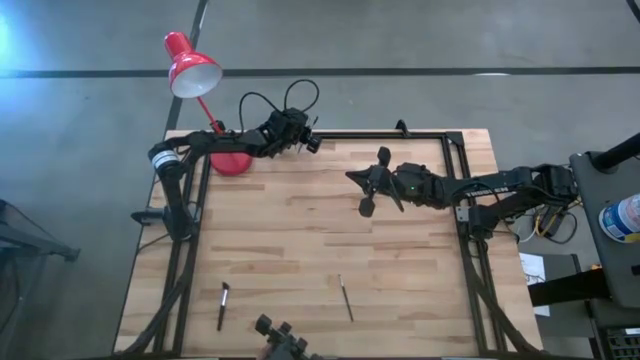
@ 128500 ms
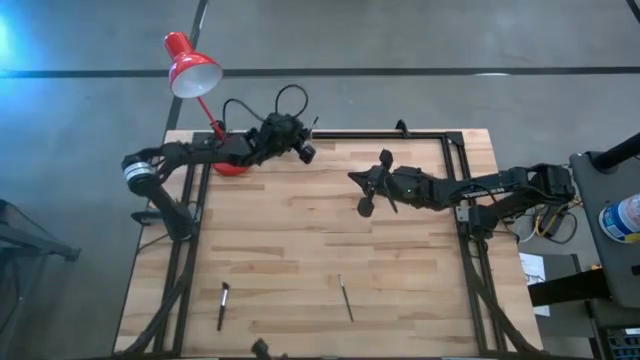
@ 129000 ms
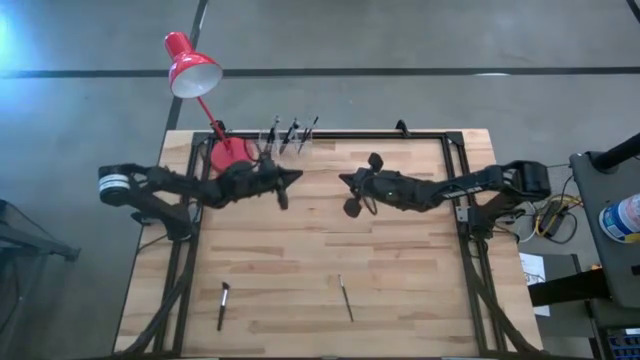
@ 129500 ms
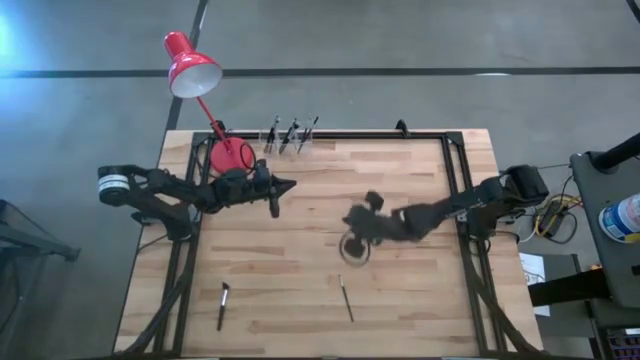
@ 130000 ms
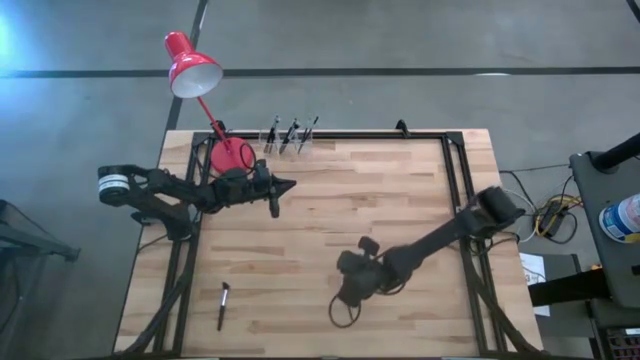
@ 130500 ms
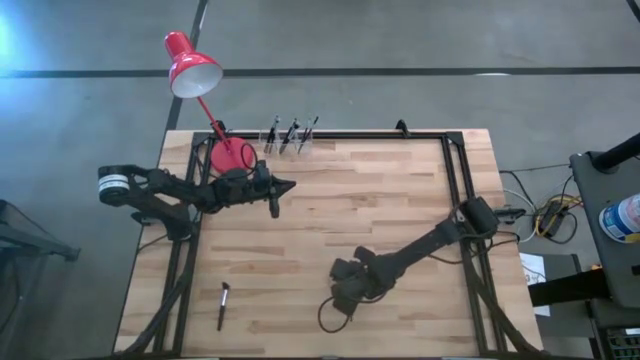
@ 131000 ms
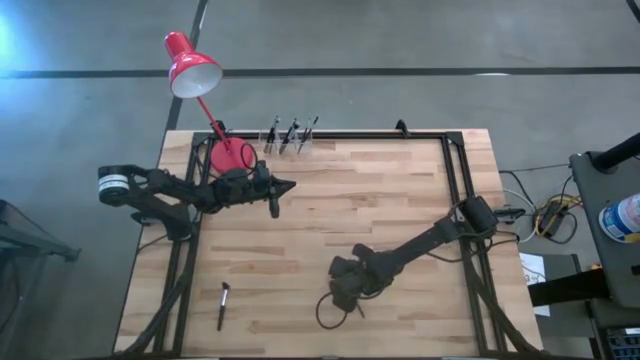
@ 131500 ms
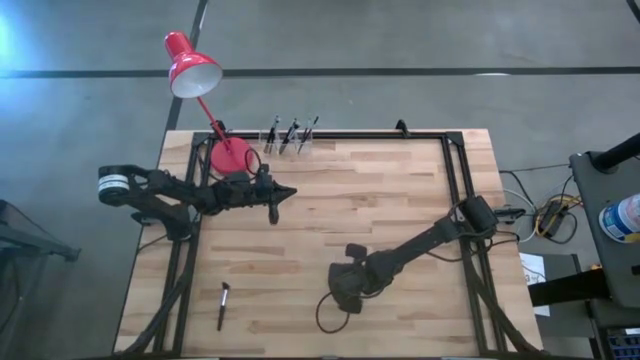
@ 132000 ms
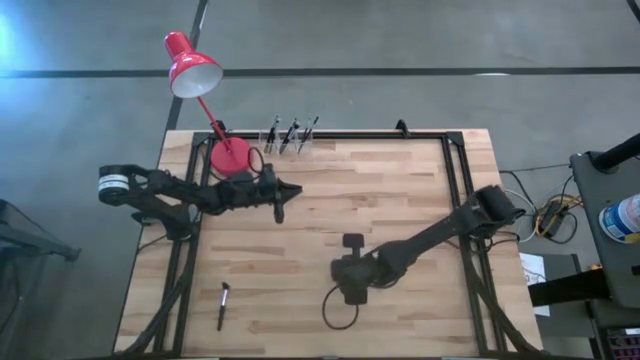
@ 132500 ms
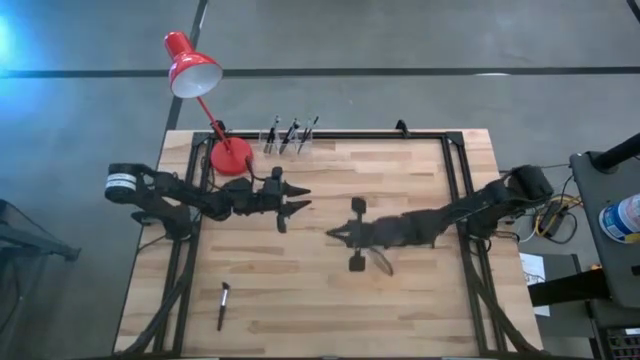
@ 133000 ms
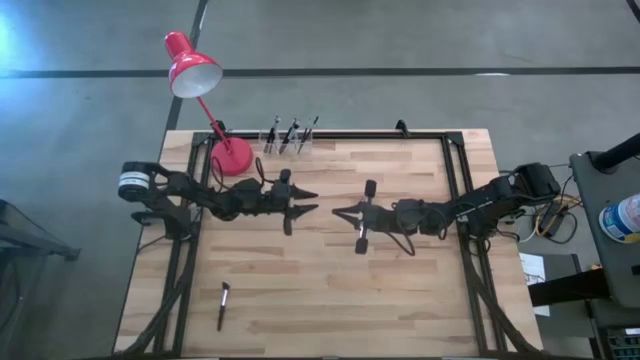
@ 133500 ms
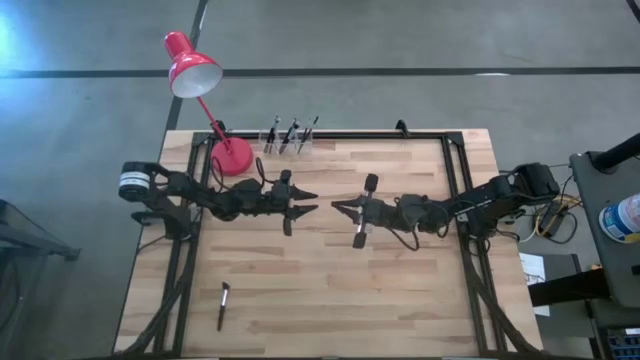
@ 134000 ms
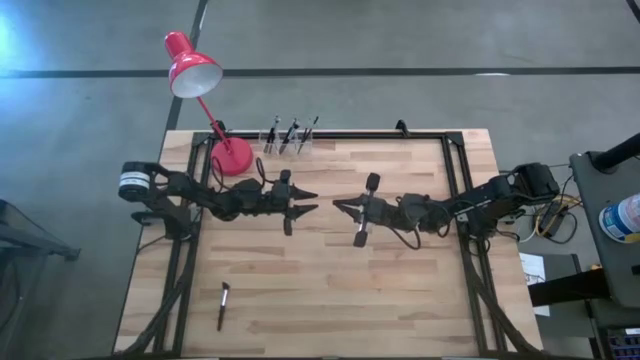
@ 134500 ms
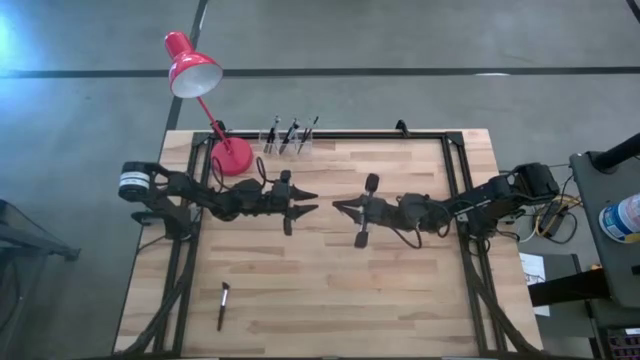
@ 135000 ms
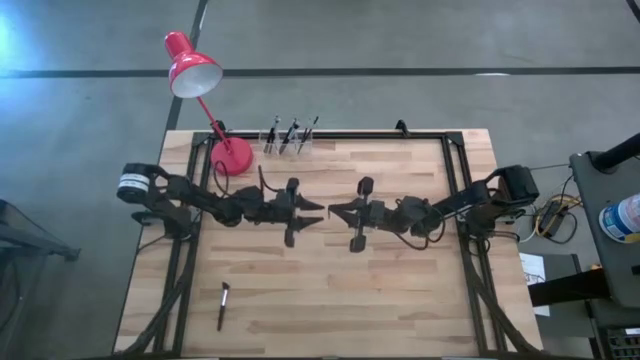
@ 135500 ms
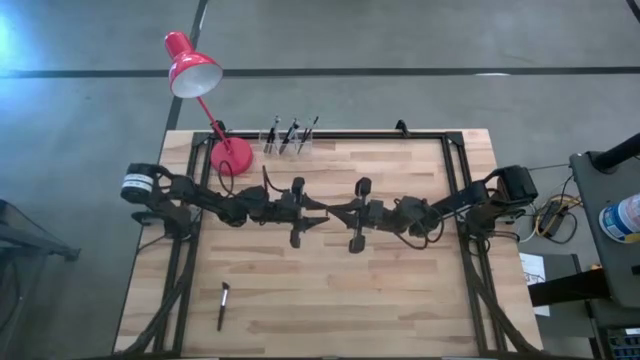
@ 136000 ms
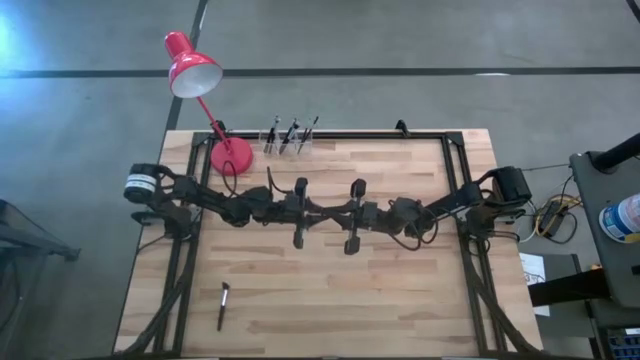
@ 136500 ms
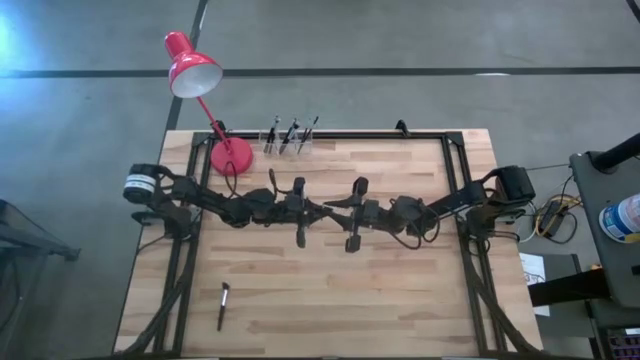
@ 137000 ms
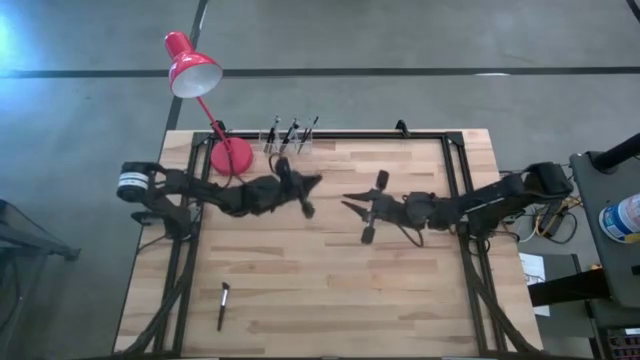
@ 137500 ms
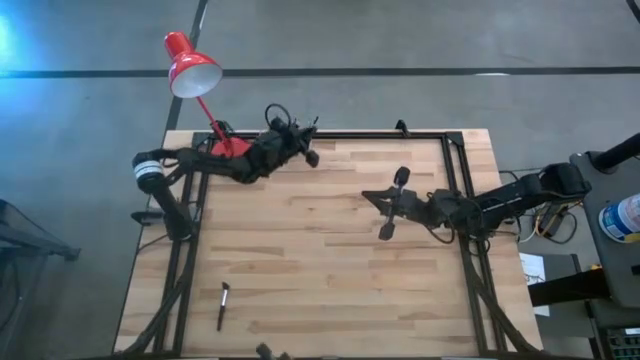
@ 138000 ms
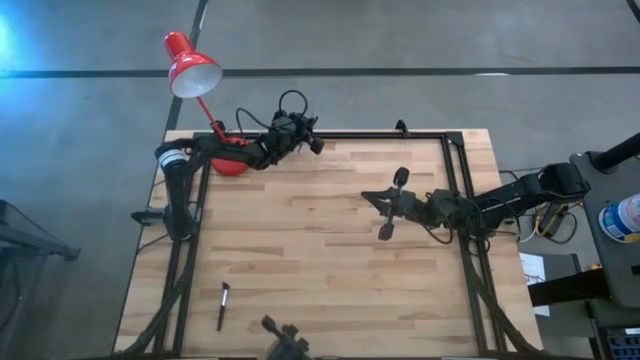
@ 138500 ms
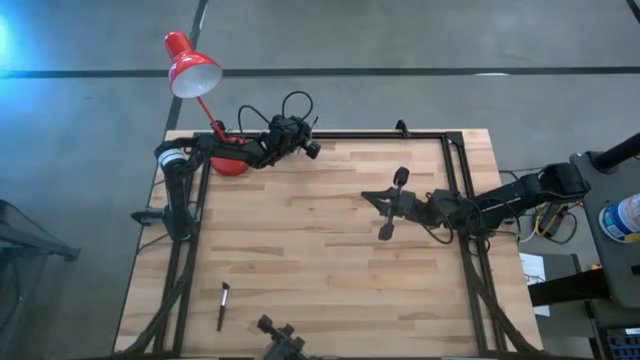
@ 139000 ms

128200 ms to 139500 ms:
Task: Pick & Place Makeup Supplies
Put the makeup brush into the transparent organizer

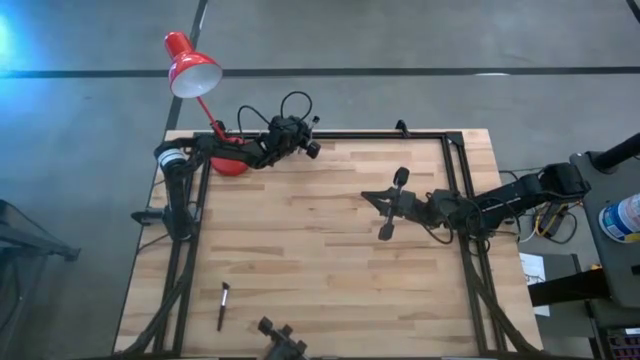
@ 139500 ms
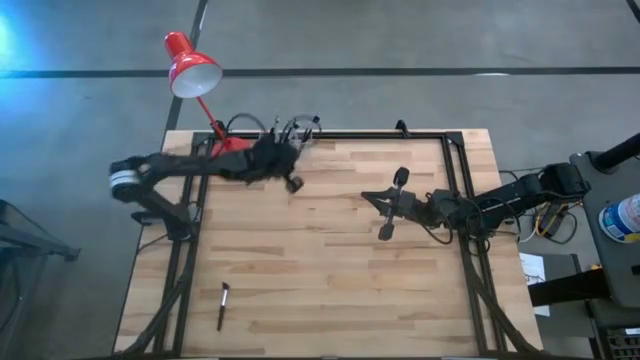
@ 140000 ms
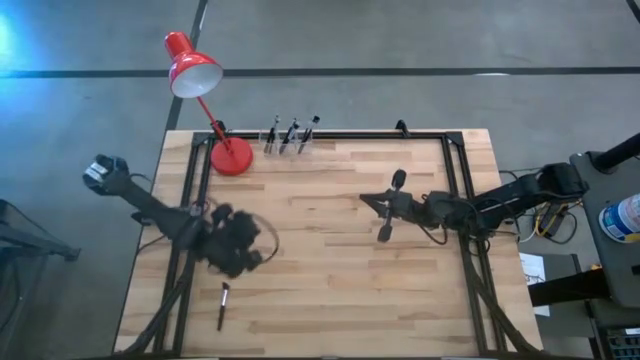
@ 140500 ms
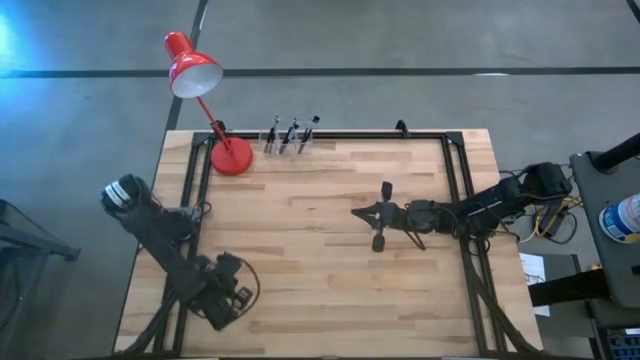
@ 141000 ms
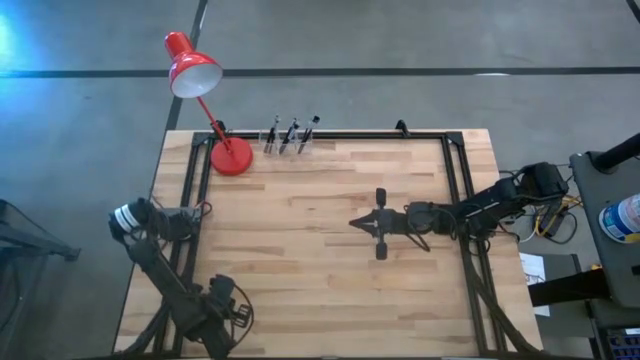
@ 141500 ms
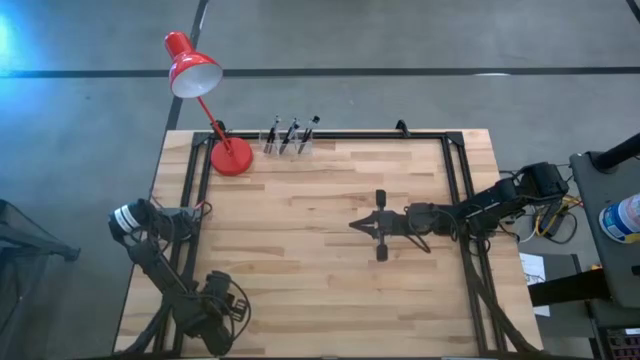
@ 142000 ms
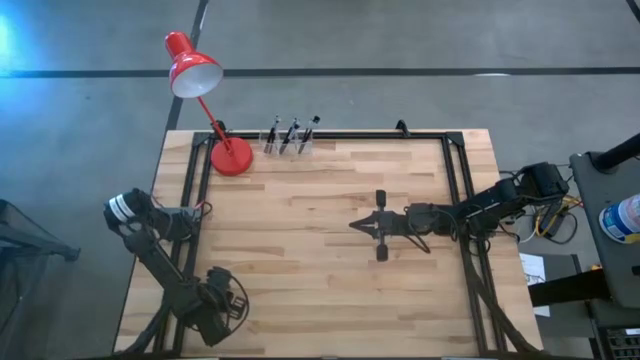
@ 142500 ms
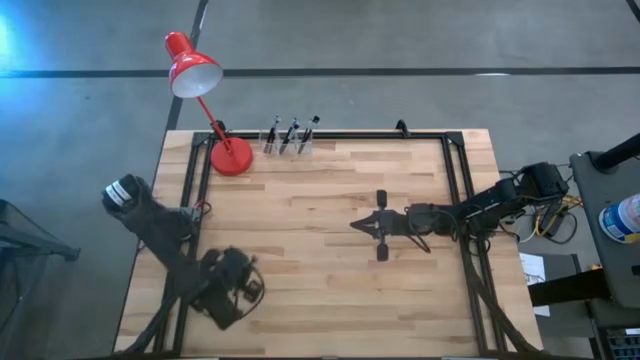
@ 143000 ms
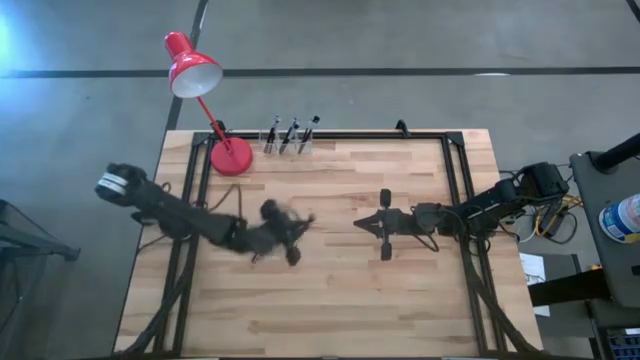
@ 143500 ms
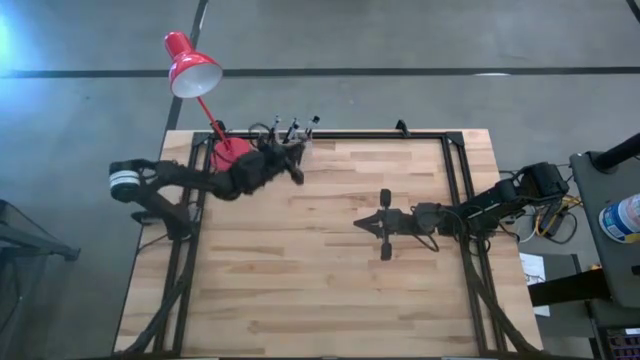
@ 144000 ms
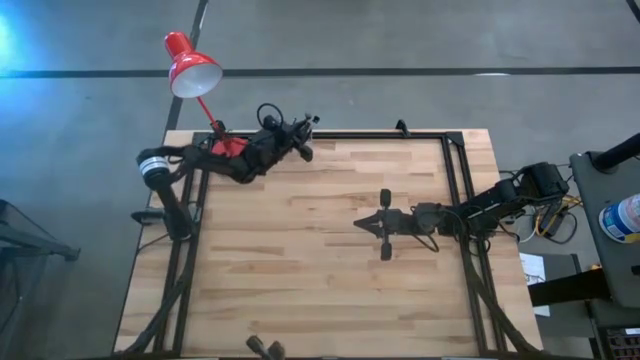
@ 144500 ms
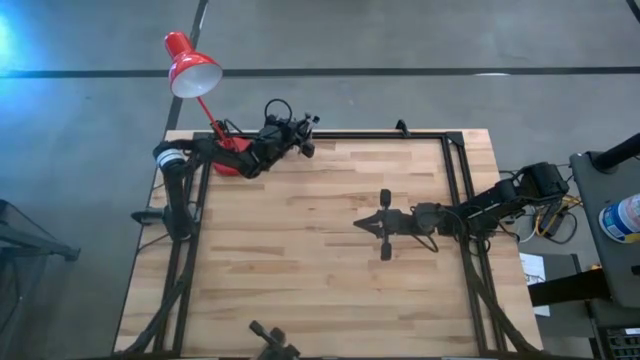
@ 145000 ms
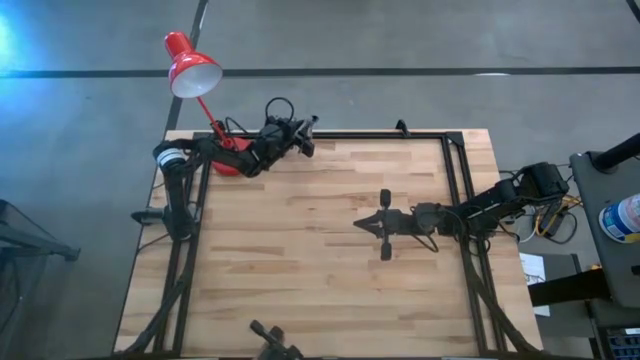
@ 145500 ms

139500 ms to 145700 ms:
Put the makeup brush into the transparent organizer

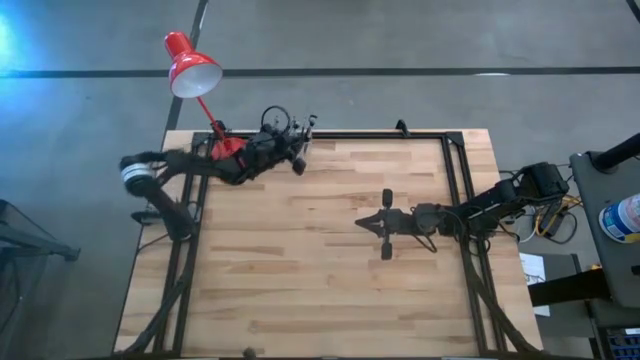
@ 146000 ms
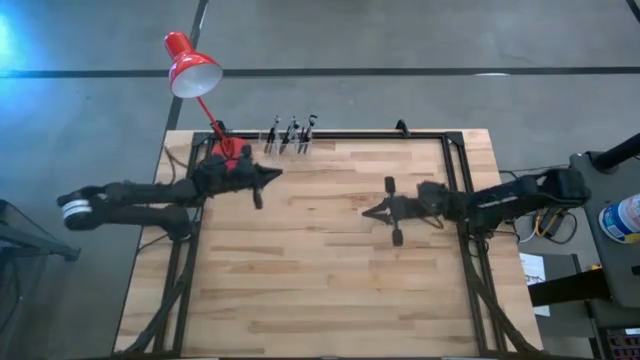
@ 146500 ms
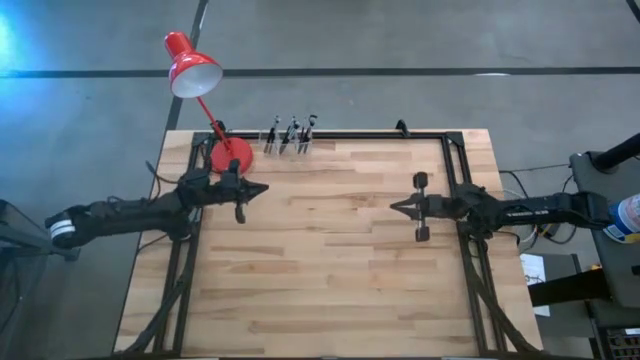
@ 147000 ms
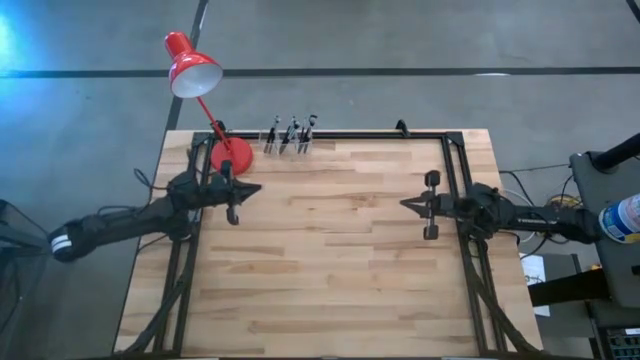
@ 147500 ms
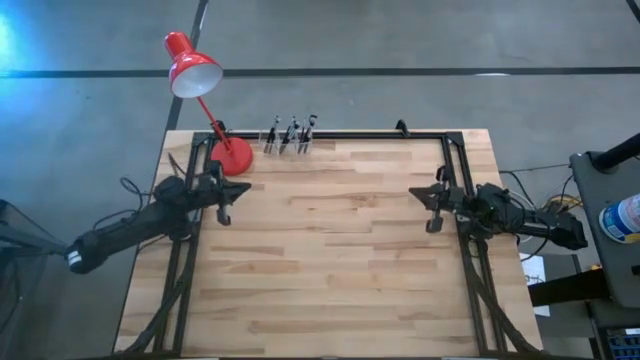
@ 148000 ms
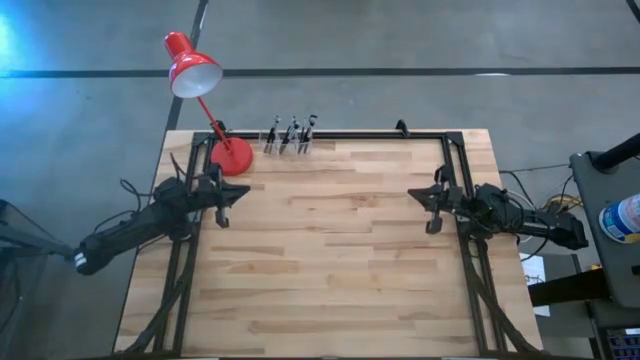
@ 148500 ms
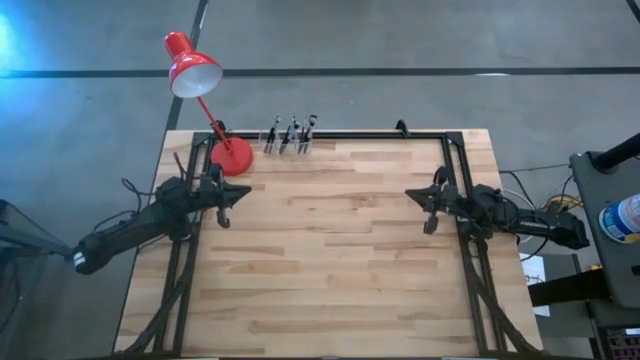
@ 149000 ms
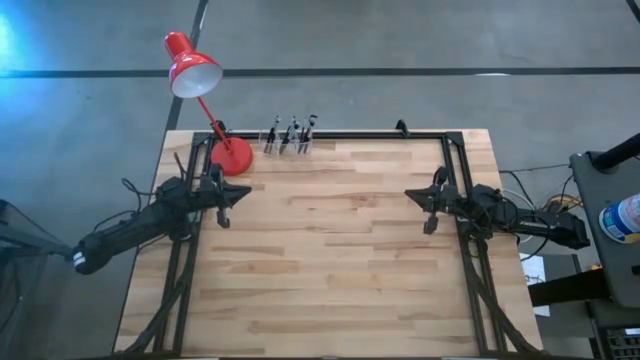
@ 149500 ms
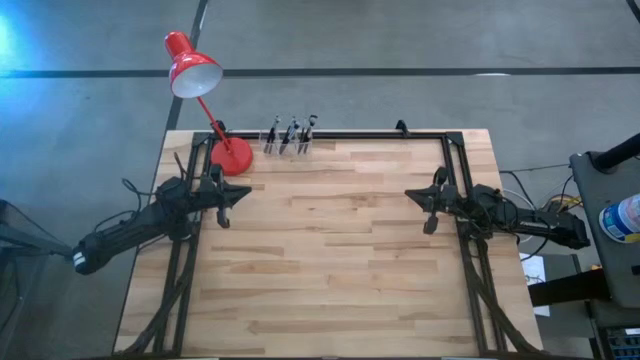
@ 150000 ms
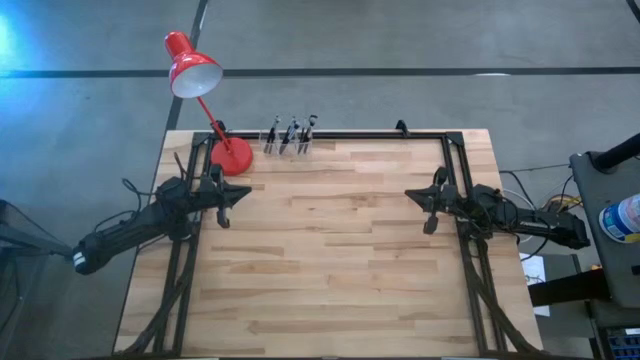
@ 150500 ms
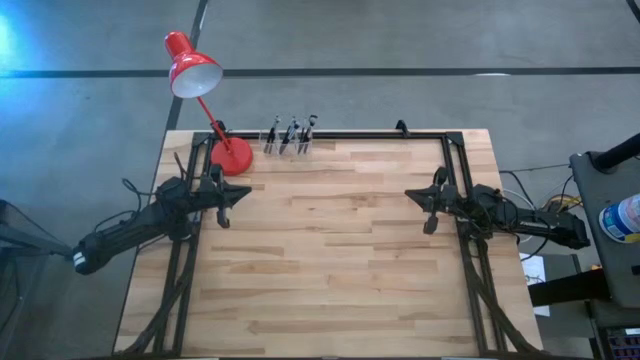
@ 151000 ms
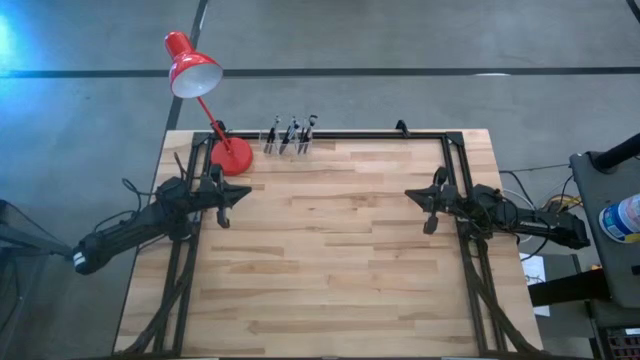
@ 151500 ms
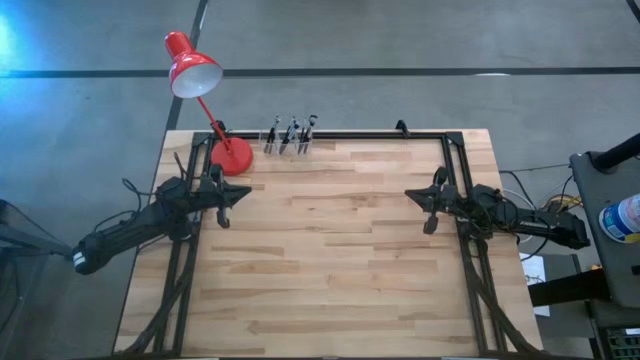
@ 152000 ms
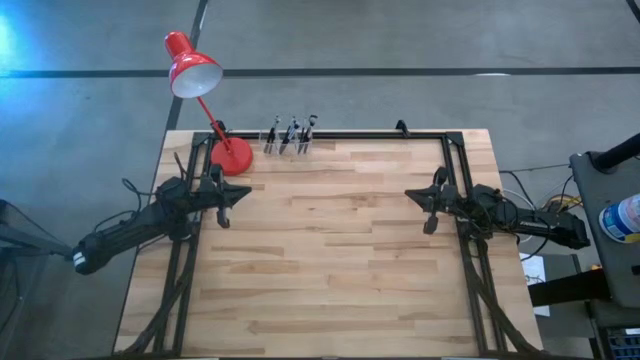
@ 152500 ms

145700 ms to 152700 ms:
Return to Home Position
